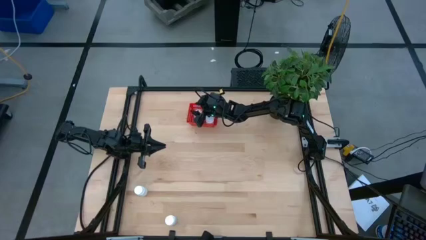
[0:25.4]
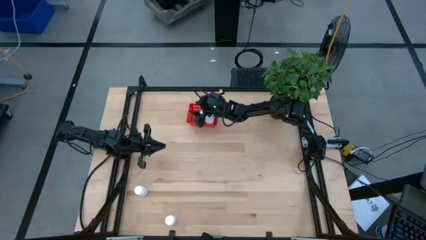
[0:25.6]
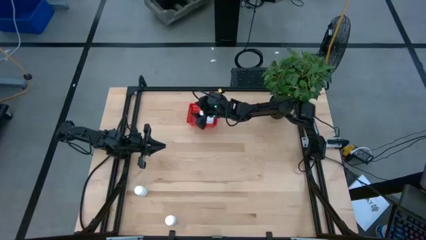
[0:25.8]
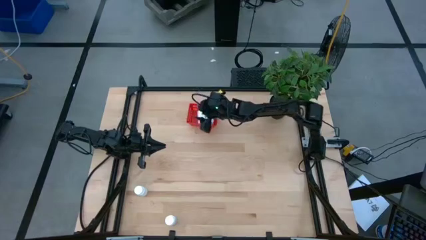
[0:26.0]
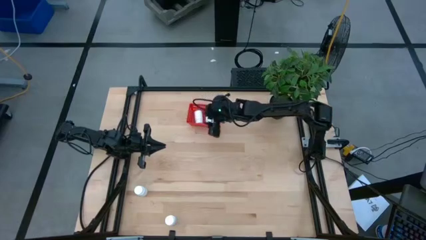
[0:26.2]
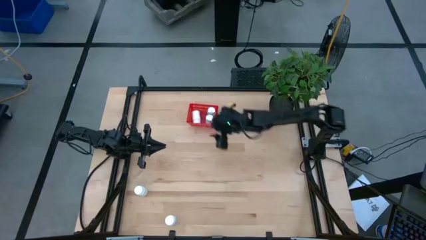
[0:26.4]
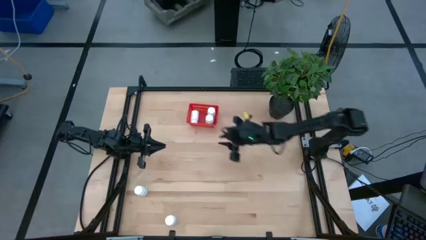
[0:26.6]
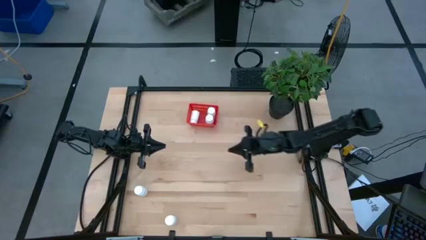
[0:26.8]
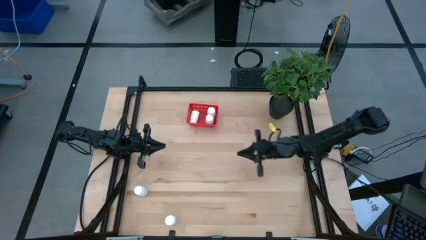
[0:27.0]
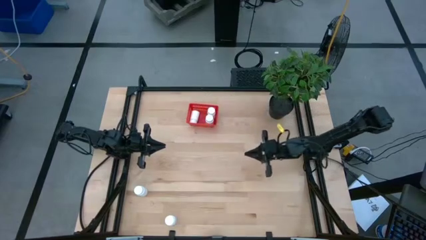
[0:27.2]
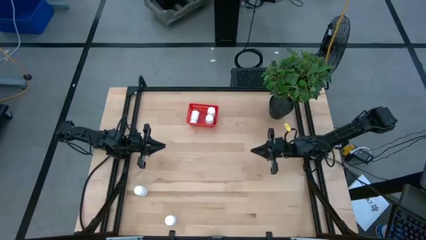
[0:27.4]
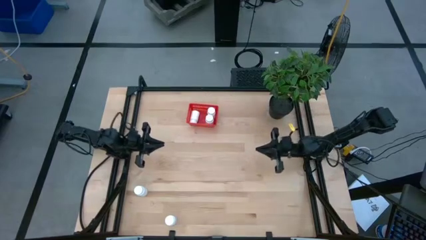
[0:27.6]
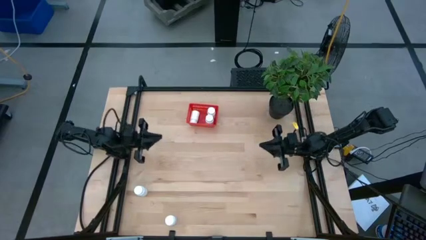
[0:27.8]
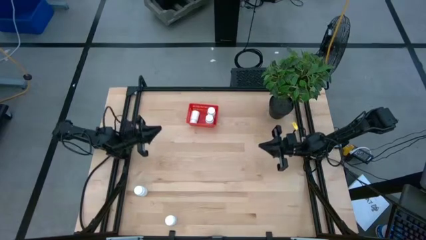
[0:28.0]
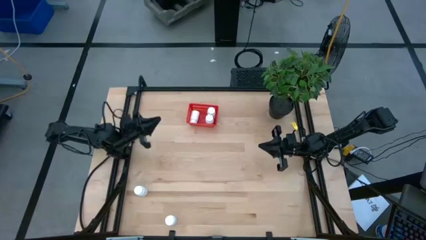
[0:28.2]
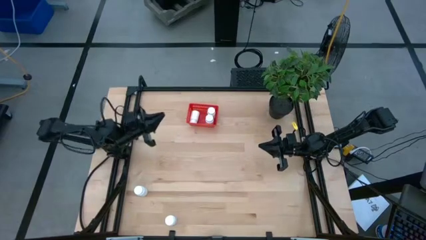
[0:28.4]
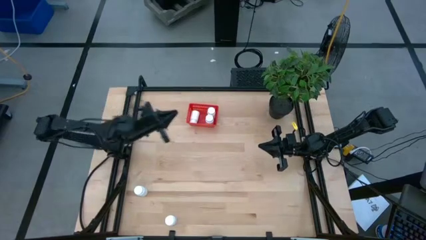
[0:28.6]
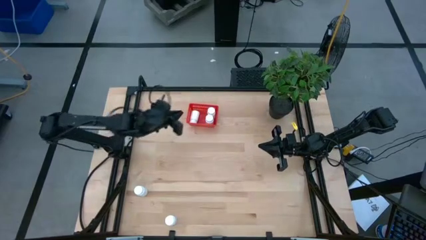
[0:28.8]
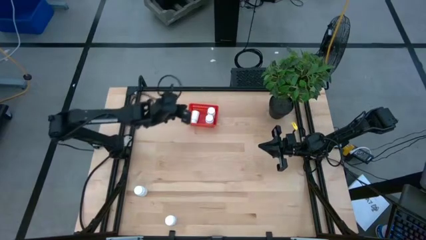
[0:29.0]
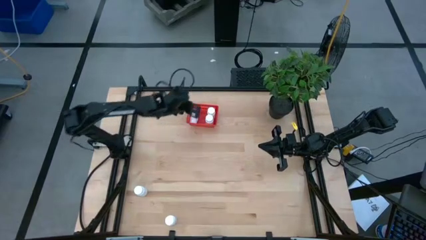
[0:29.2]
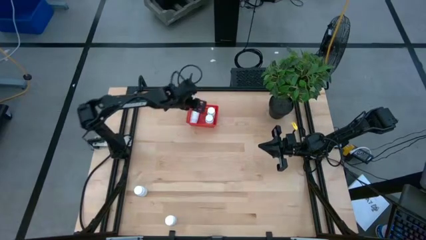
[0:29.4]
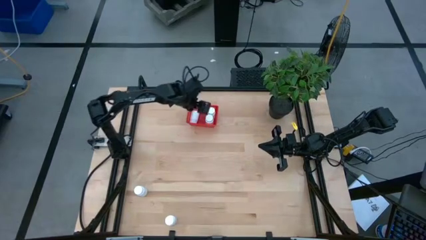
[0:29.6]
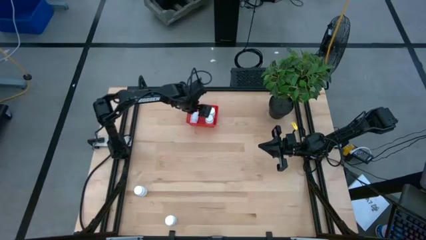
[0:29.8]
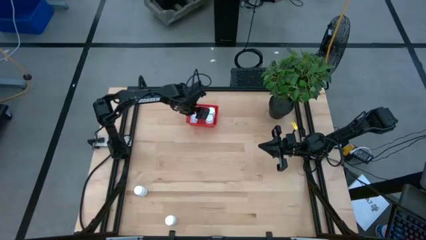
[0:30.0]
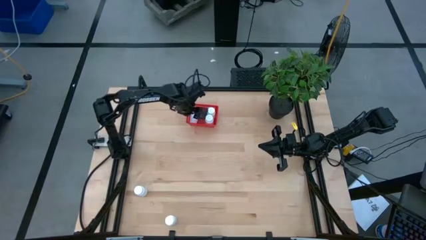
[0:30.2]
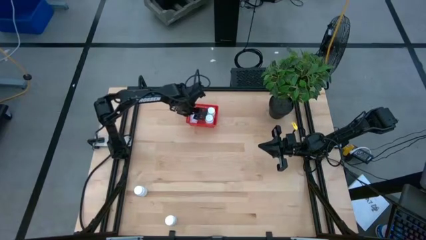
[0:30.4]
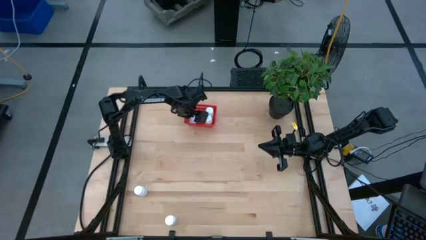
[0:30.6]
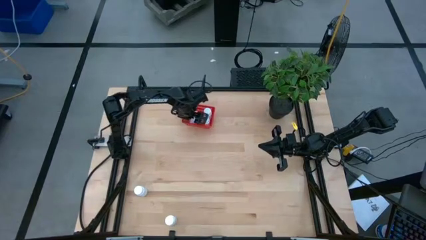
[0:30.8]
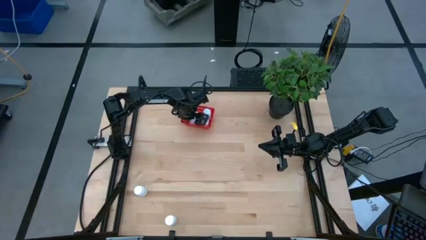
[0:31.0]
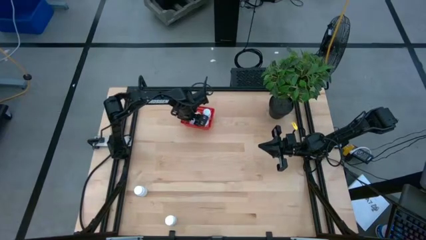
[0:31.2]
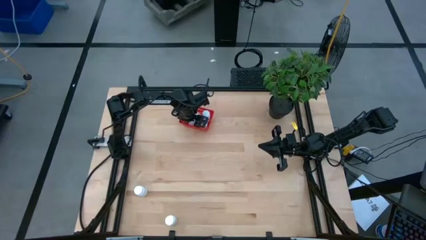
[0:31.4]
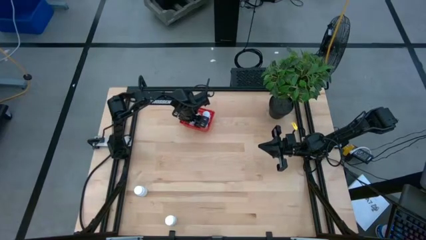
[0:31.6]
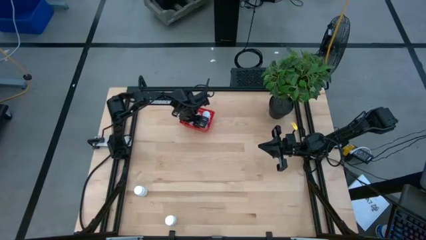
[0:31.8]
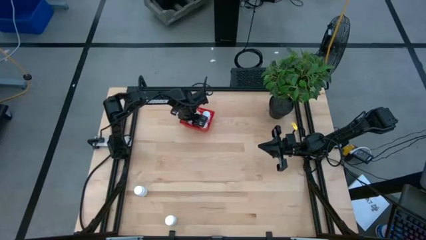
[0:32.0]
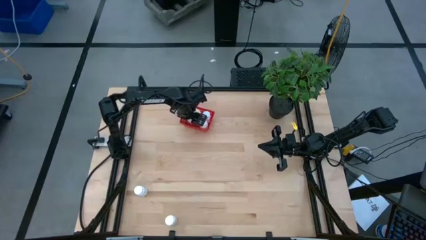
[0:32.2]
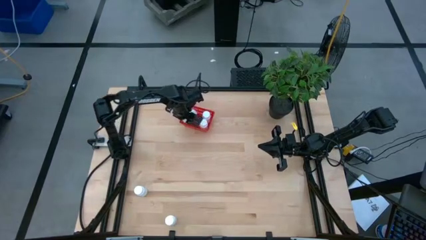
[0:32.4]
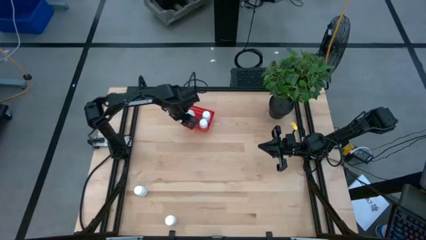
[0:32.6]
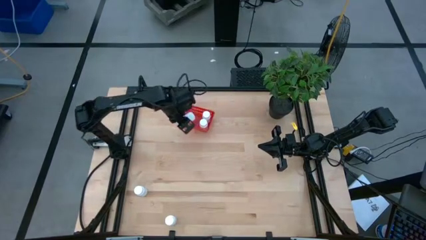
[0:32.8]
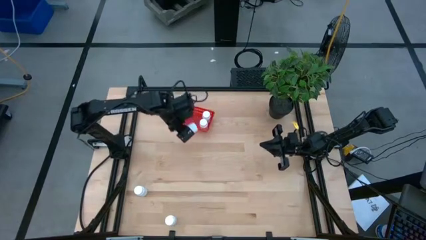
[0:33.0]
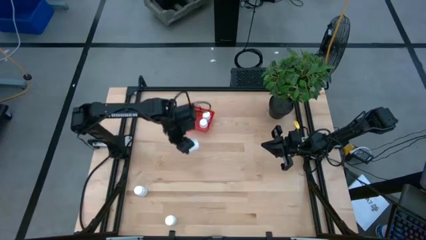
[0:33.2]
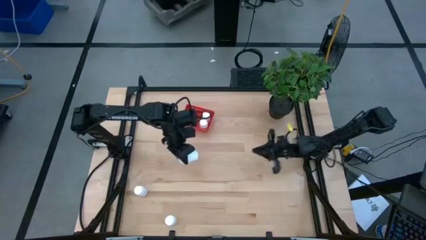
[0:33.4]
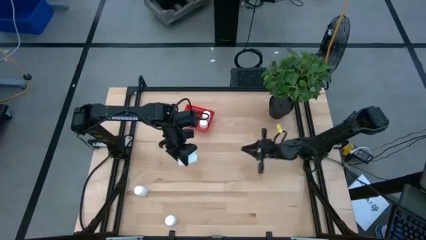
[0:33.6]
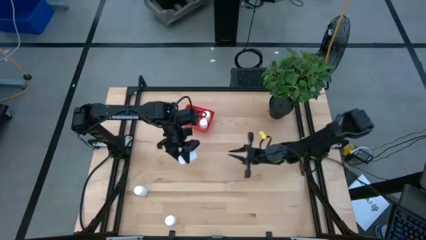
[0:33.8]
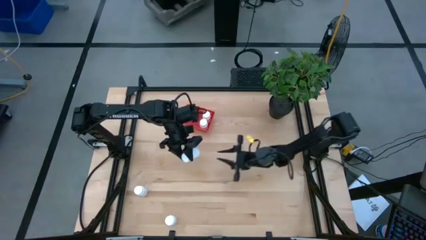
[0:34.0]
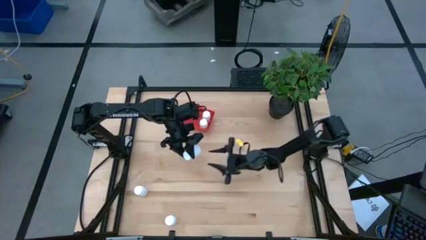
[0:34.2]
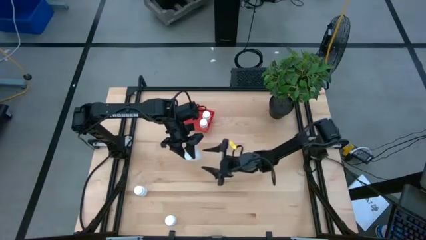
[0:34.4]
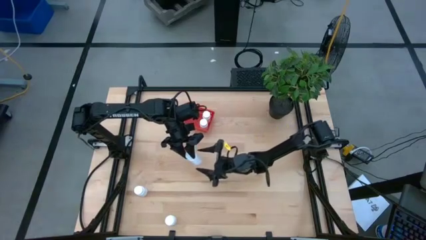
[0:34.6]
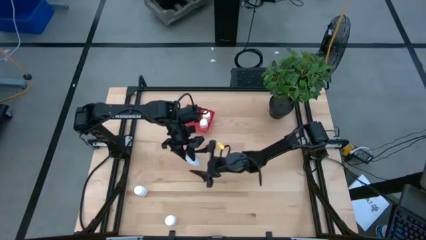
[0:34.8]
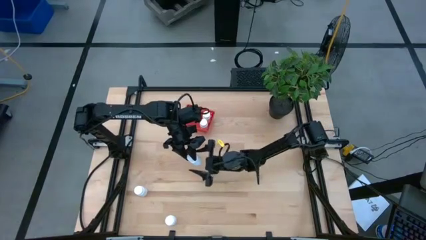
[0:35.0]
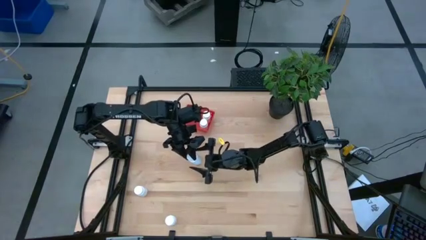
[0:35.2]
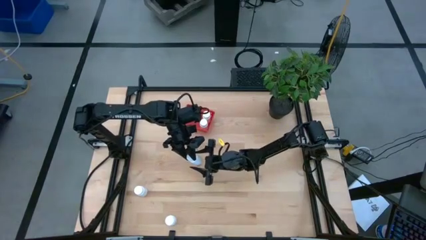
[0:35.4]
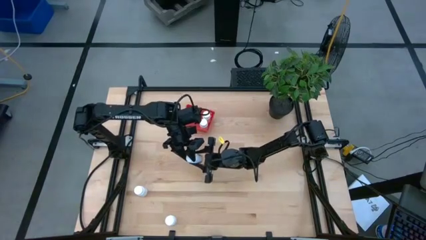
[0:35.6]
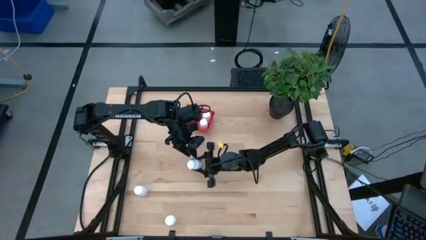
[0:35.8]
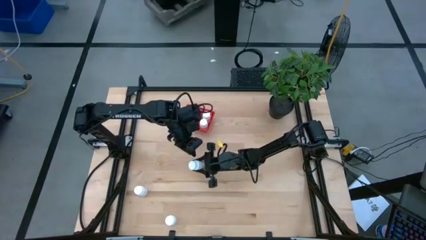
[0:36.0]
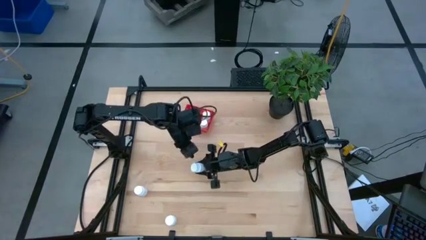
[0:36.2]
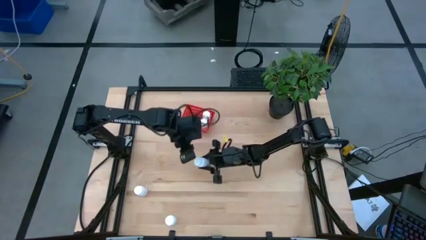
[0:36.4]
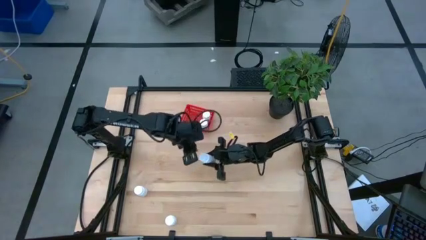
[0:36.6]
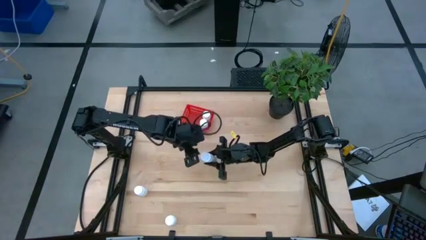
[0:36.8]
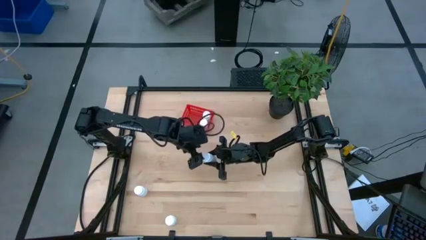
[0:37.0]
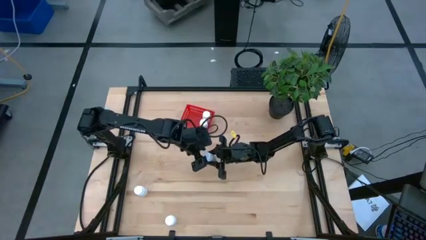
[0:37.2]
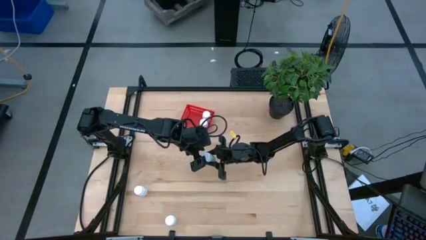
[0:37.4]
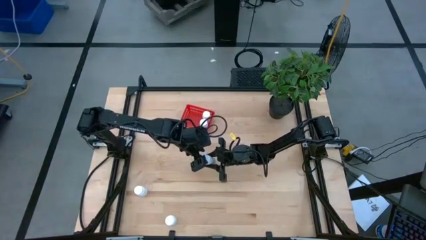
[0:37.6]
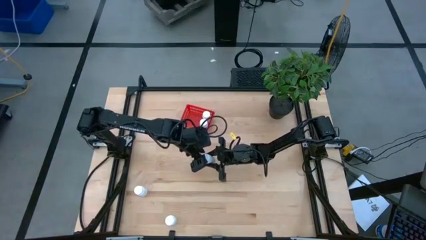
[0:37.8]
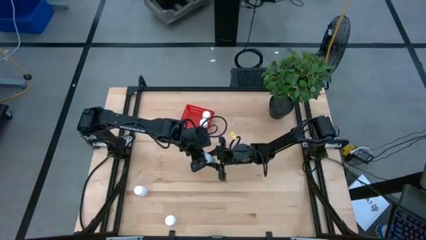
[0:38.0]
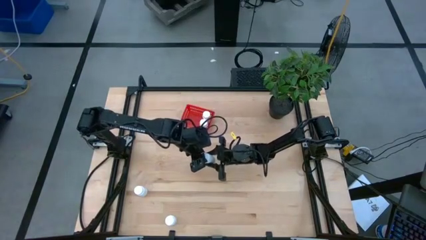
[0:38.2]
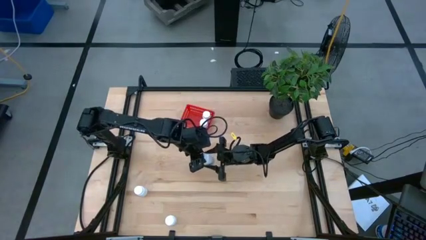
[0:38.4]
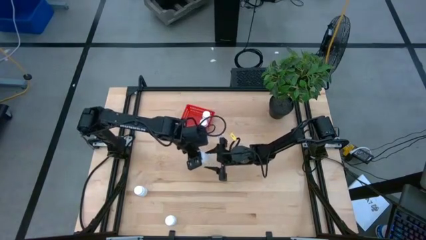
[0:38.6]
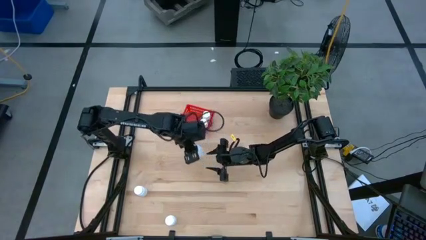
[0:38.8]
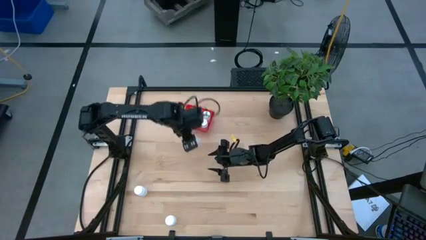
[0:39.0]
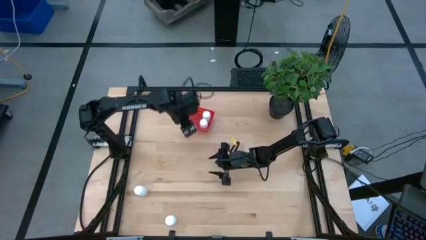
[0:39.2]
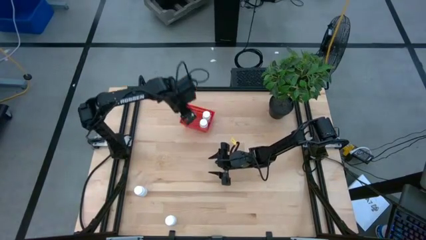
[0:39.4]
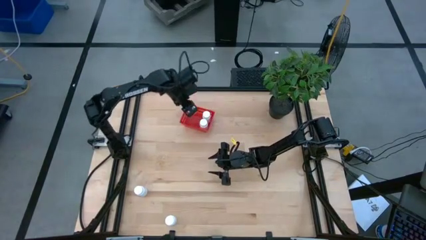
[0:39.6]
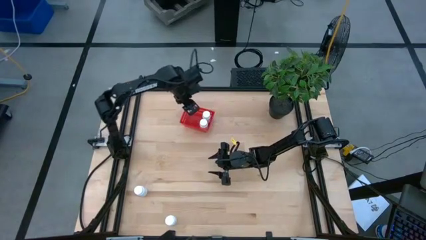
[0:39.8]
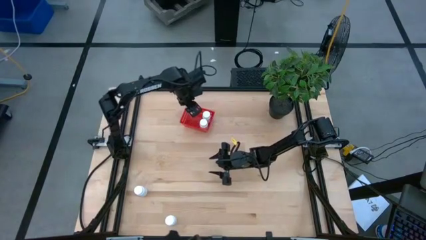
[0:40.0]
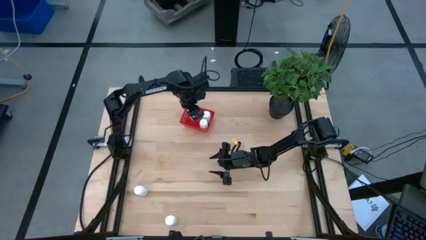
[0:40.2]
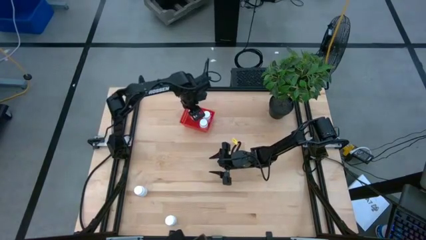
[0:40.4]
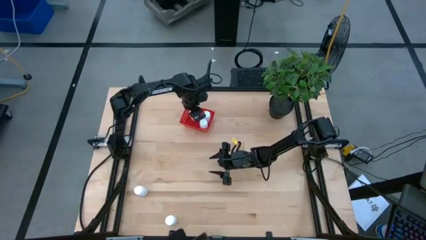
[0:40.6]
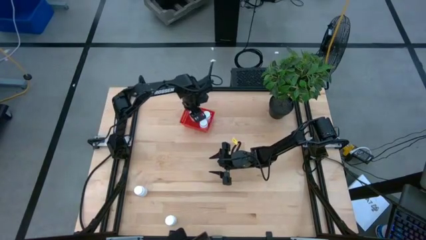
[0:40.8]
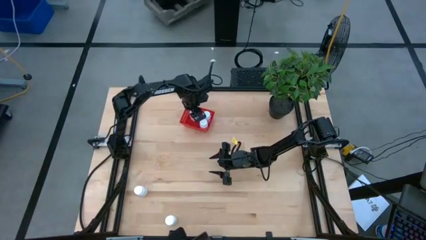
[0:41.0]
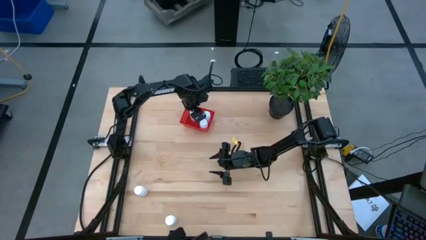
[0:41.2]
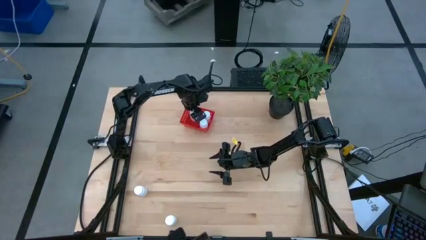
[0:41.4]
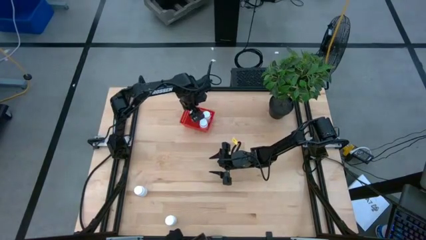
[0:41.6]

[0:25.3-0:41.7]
Task: Pick and place pill bottles into a basket
Put the white pill bottle into the orange basket
